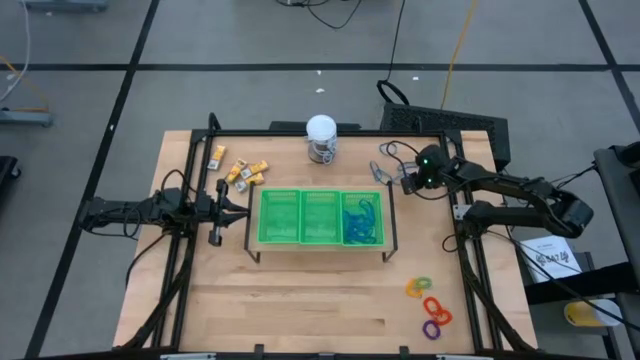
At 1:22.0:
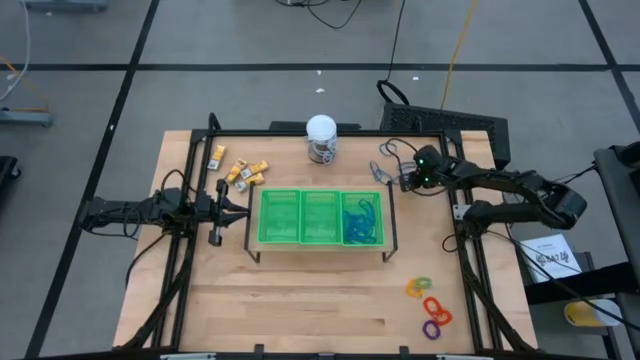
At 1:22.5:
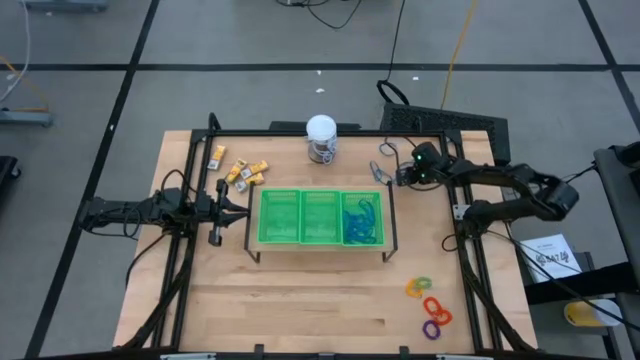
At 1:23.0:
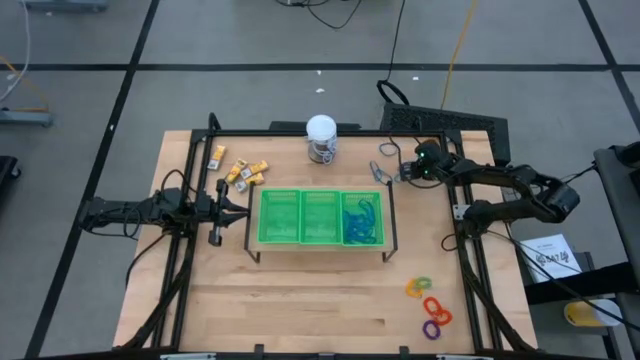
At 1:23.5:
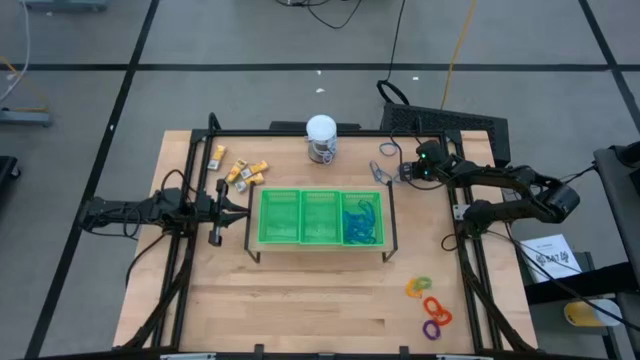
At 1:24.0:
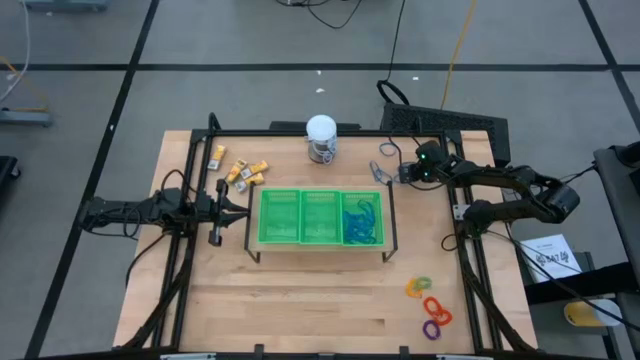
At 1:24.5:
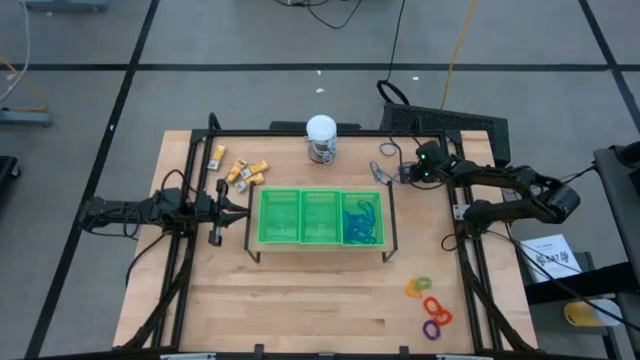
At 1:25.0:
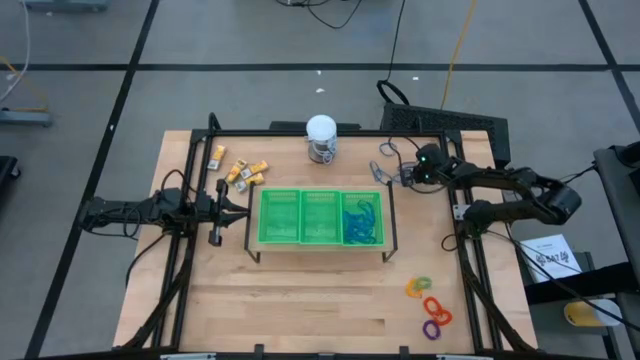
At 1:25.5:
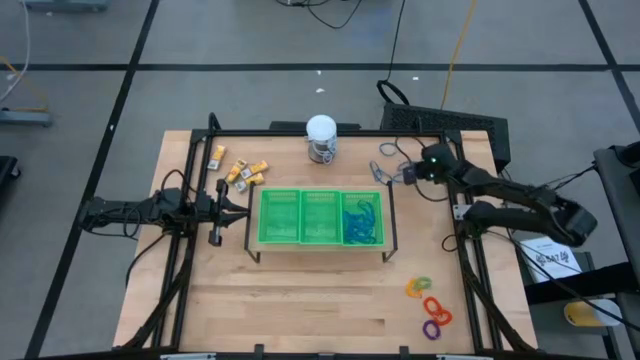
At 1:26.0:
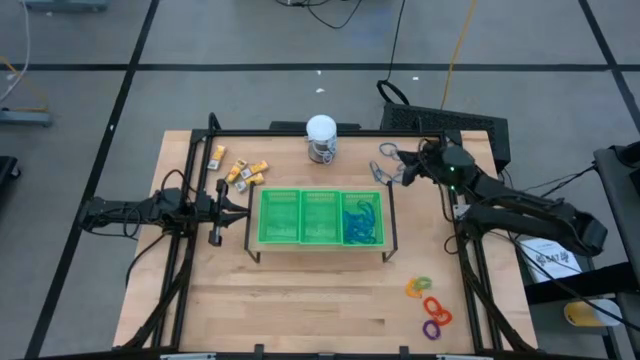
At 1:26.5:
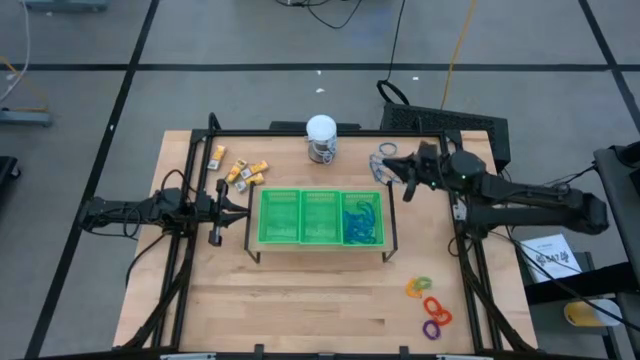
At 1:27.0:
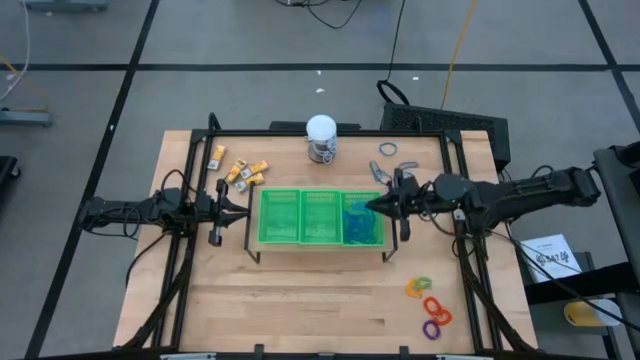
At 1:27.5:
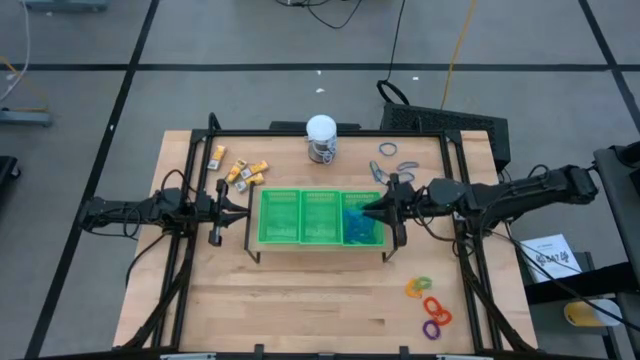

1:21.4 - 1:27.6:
Task: Pick & Place Office Desk Supplies
Put the blue rubber band into the right green bin on the shelf

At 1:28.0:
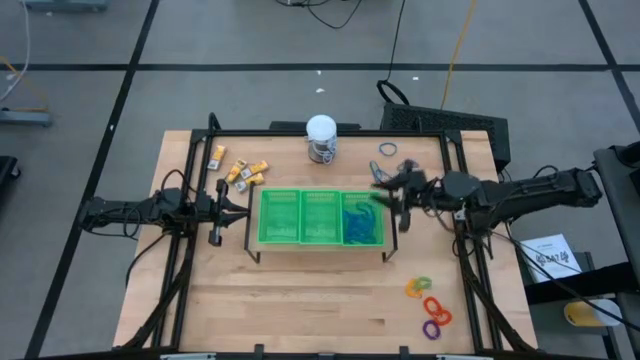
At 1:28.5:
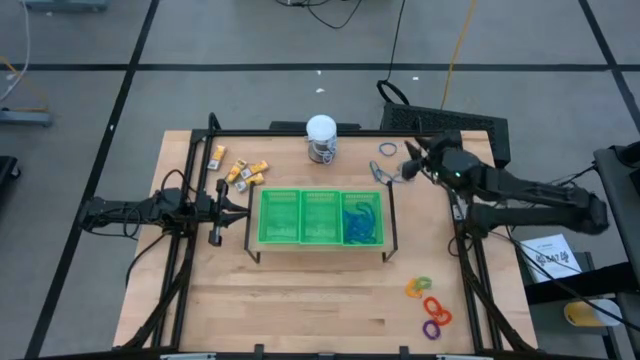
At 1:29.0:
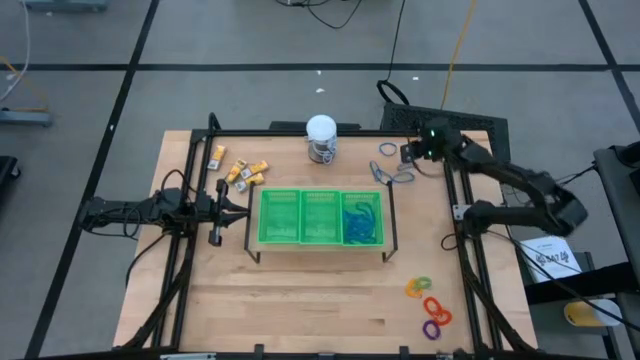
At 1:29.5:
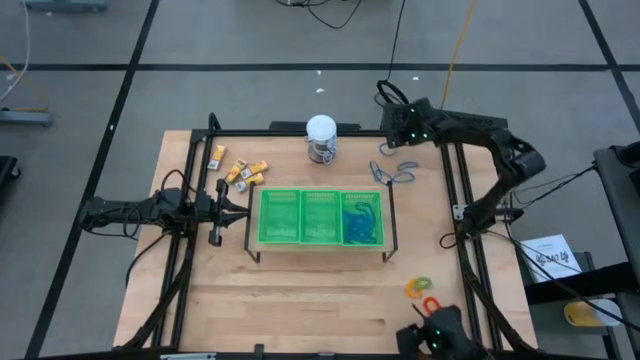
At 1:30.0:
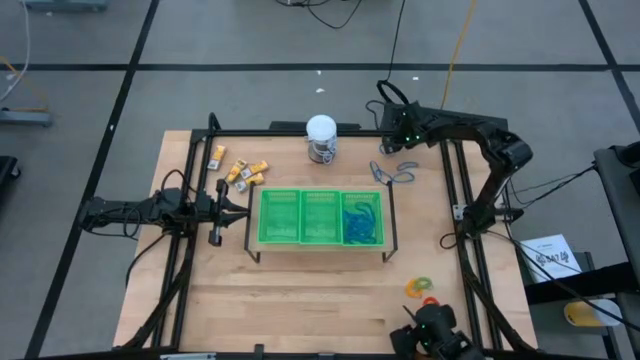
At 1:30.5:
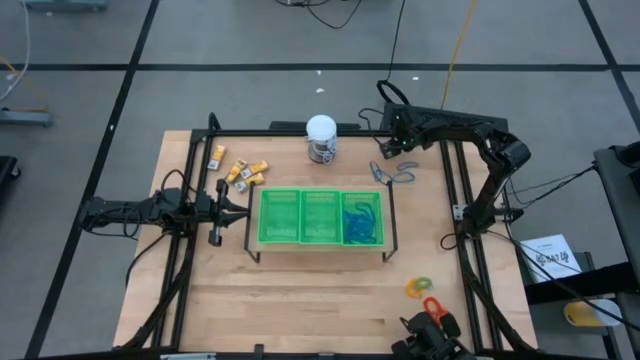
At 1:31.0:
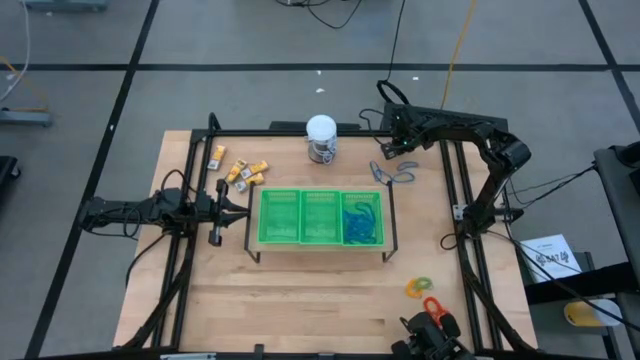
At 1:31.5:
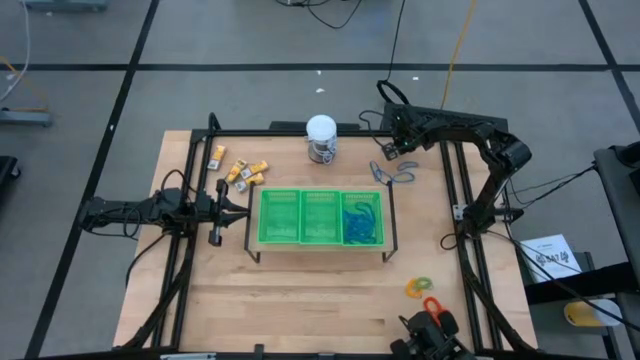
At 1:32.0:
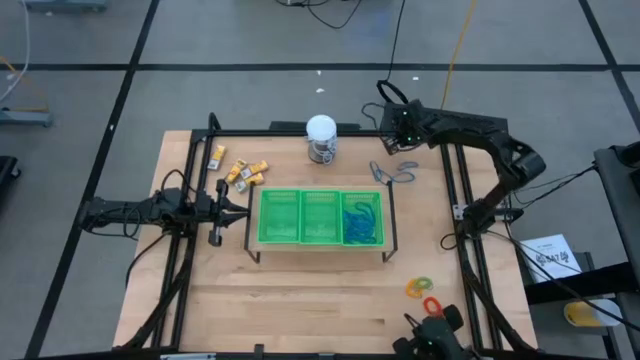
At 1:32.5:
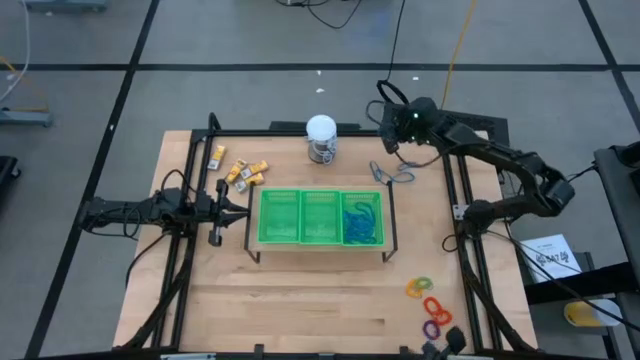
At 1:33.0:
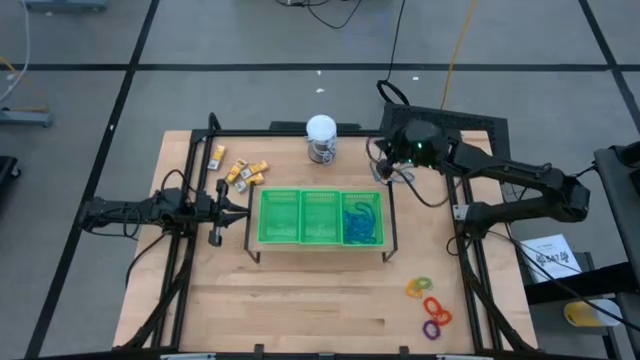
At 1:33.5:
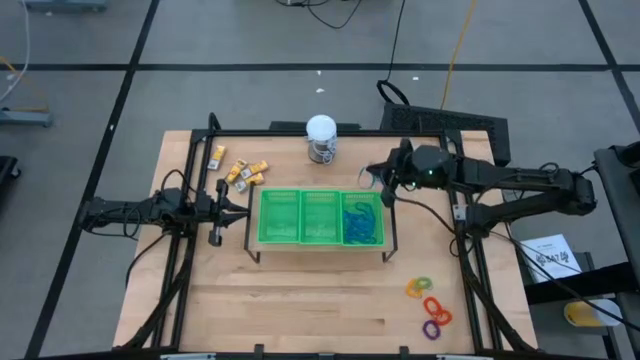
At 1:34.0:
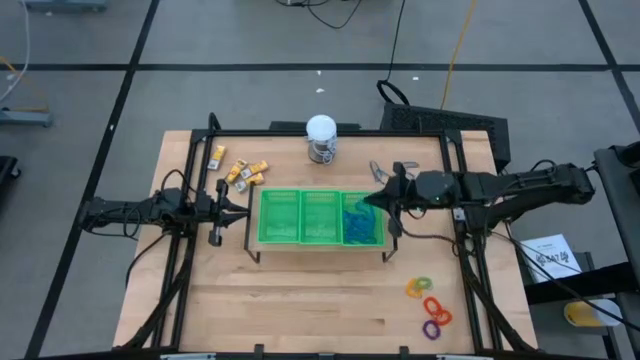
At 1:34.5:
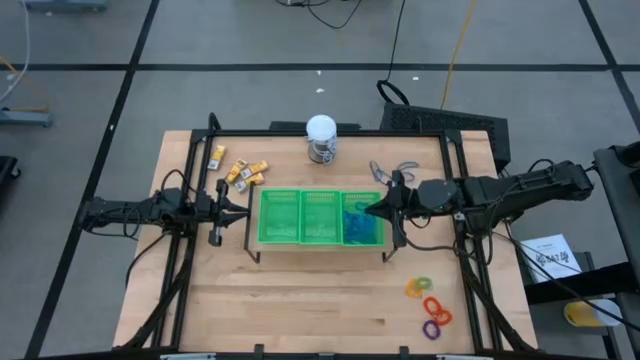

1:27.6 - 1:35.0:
Put the blue rubber band into the right green bin on the shelf

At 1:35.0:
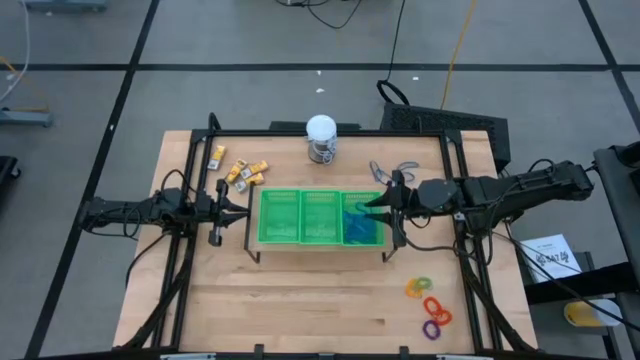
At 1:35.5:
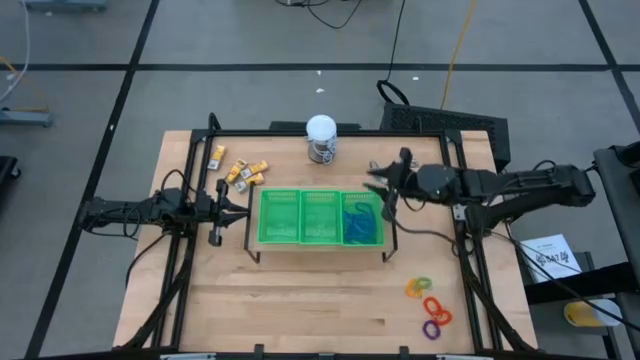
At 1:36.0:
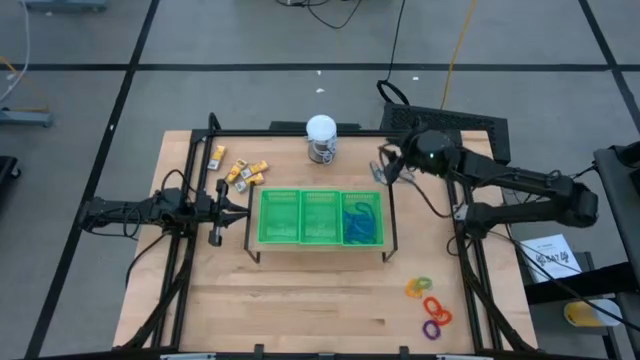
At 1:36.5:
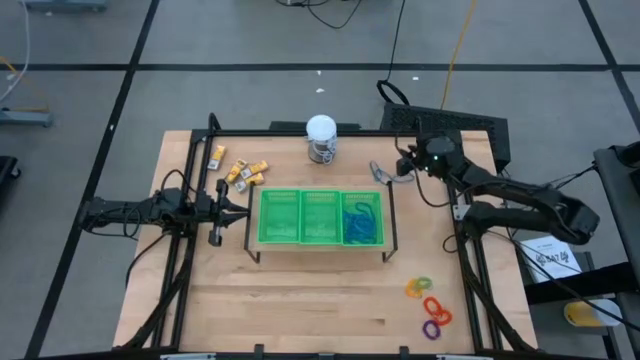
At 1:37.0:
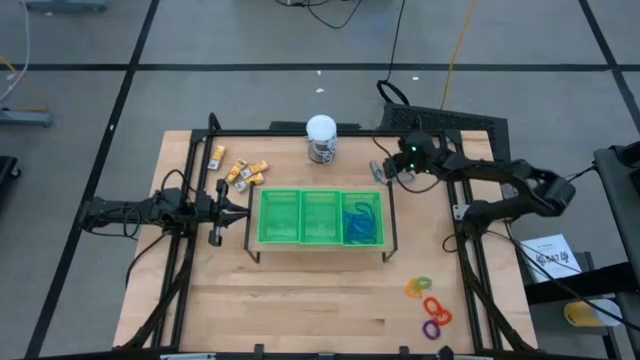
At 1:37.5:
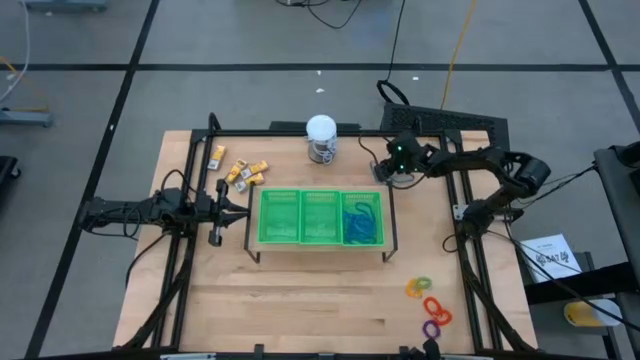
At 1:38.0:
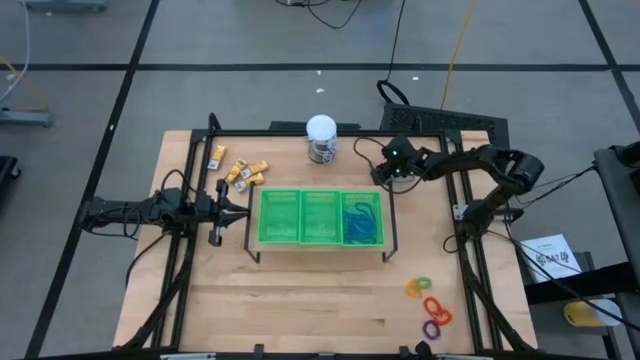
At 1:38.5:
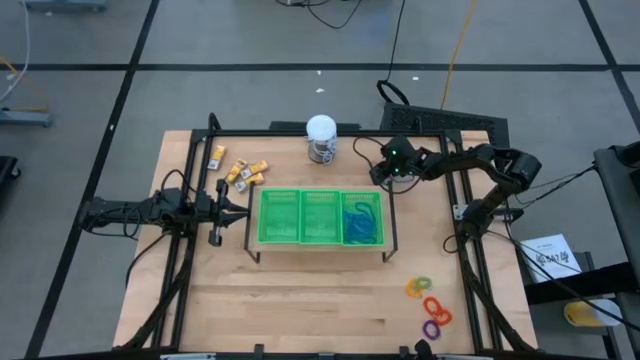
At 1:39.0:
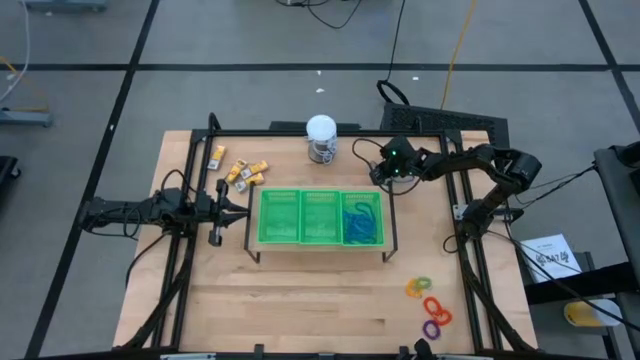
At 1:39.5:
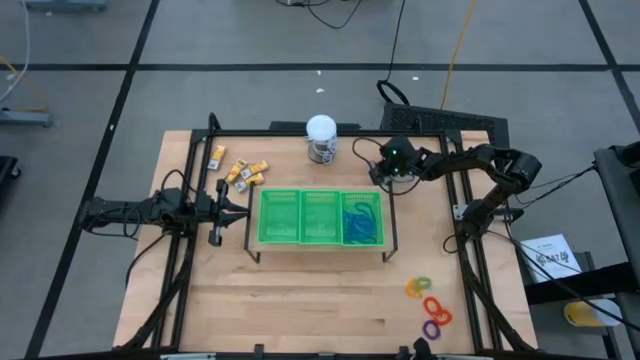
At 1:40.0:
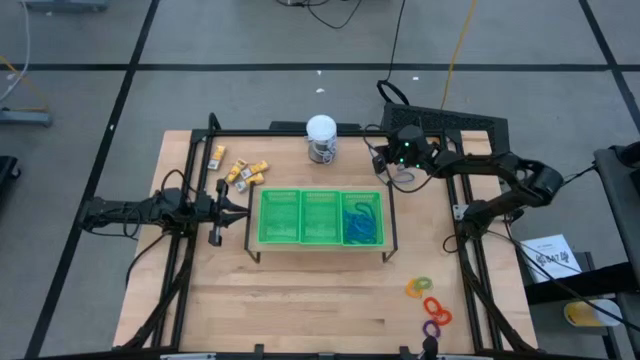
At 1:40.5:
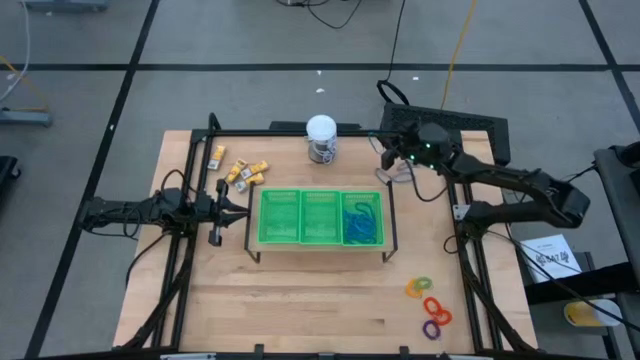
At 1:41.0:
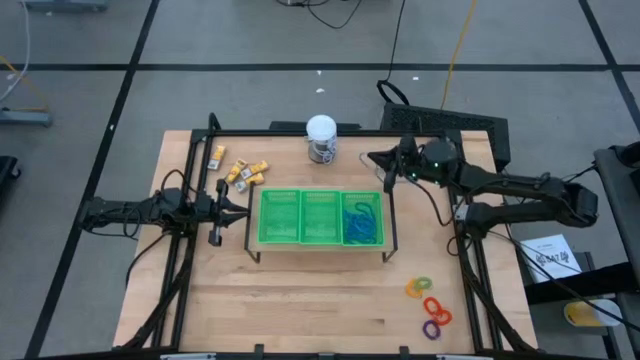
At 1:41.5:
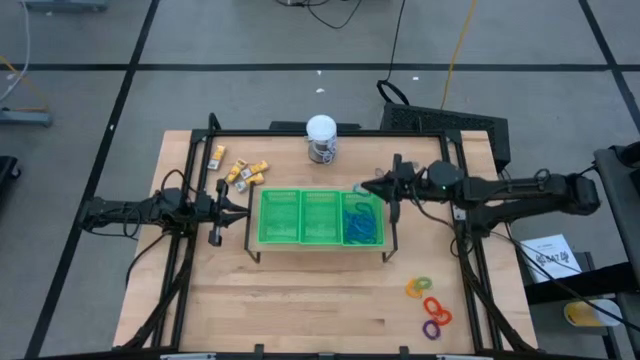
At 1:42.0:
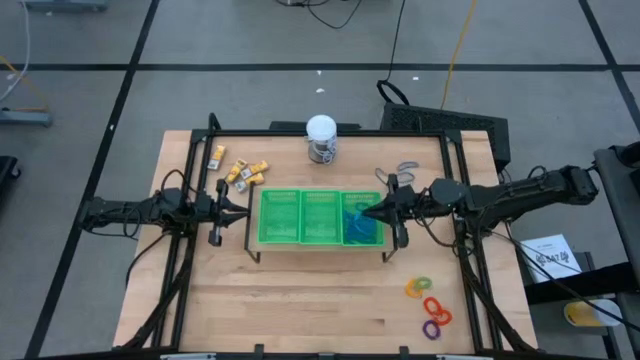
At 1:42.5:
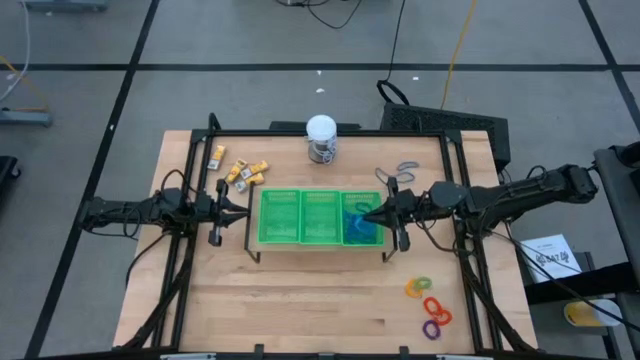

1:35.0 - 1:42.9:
Put the blue rubber band into the right green bin on the shelf
